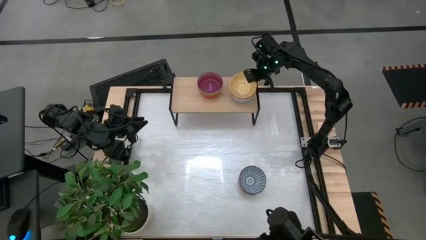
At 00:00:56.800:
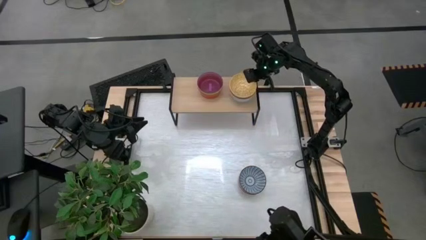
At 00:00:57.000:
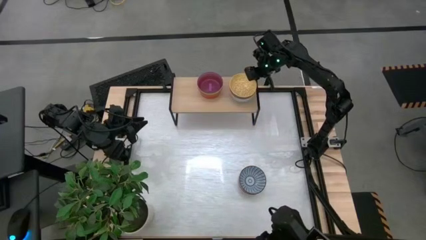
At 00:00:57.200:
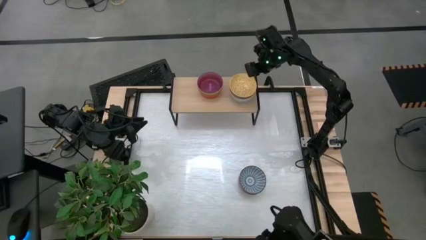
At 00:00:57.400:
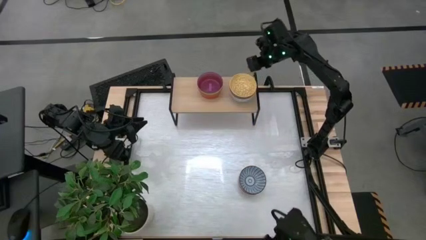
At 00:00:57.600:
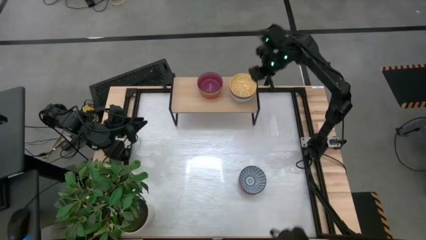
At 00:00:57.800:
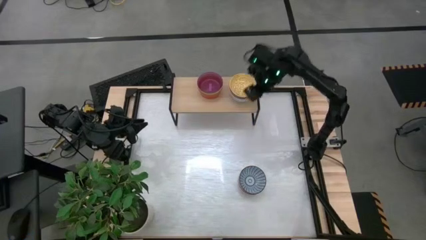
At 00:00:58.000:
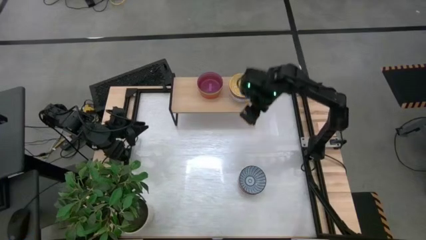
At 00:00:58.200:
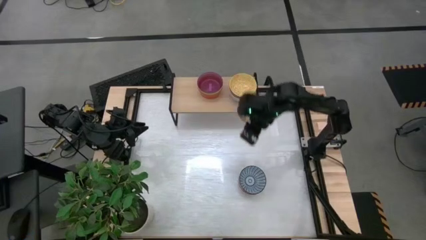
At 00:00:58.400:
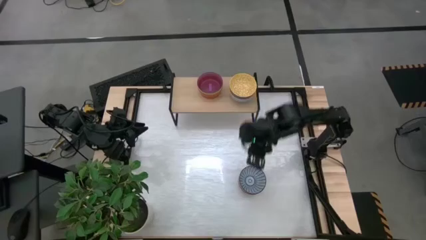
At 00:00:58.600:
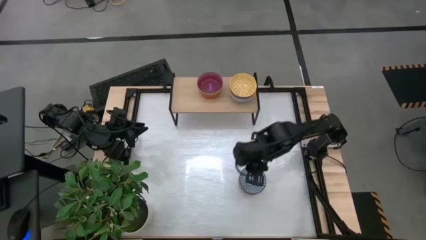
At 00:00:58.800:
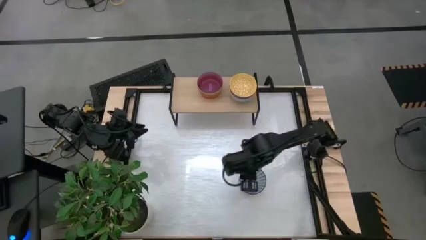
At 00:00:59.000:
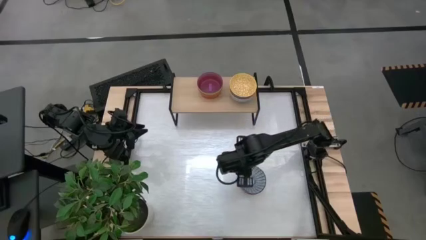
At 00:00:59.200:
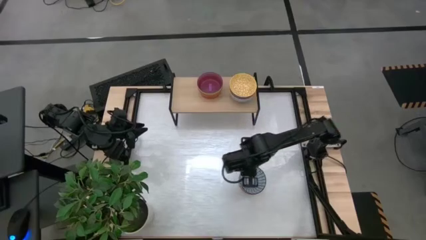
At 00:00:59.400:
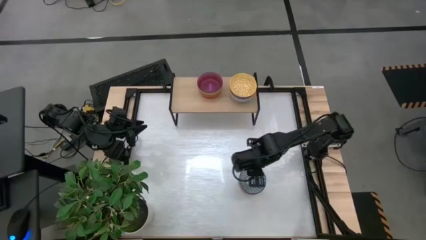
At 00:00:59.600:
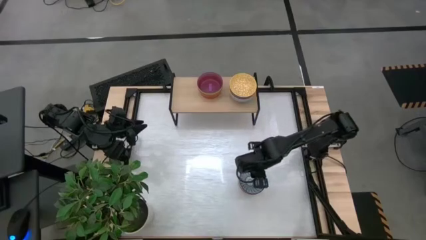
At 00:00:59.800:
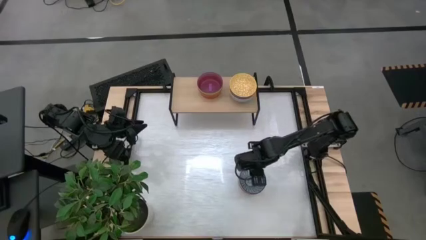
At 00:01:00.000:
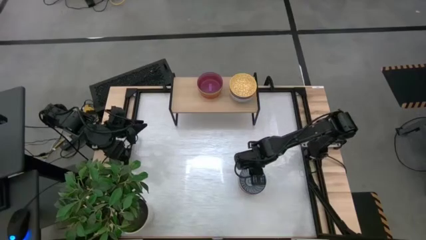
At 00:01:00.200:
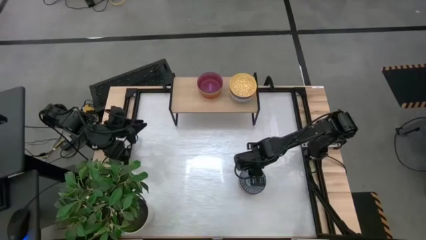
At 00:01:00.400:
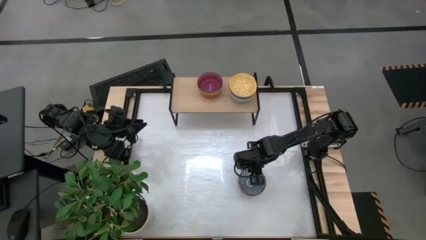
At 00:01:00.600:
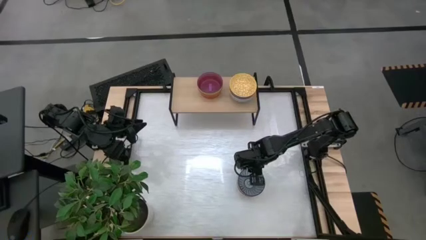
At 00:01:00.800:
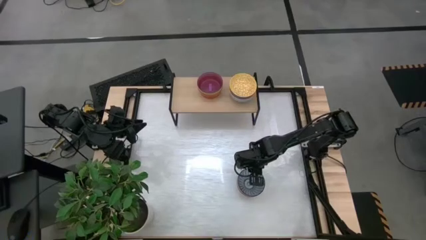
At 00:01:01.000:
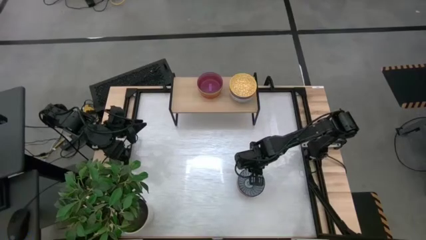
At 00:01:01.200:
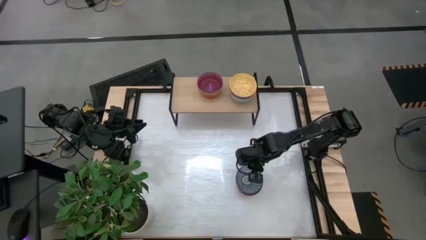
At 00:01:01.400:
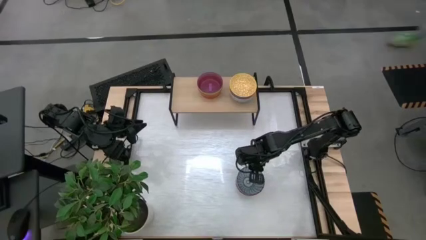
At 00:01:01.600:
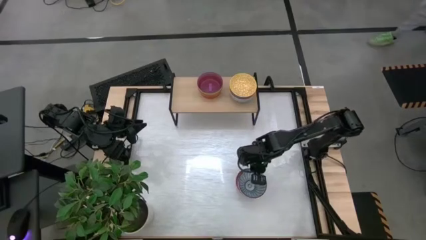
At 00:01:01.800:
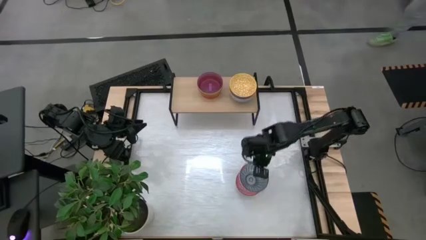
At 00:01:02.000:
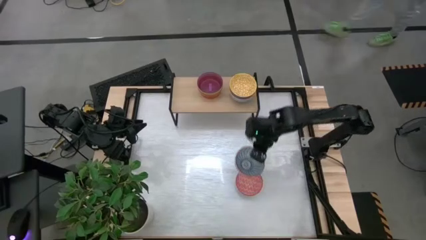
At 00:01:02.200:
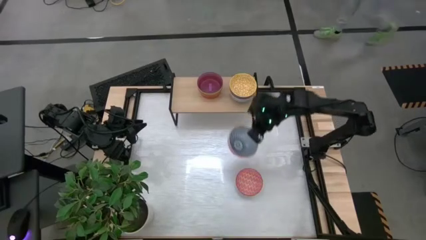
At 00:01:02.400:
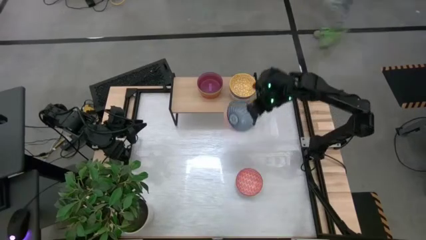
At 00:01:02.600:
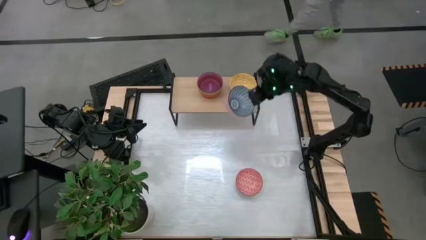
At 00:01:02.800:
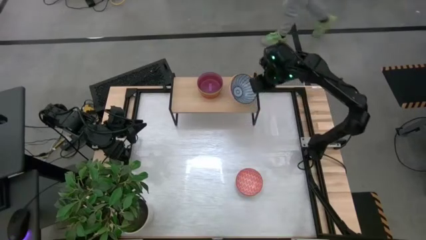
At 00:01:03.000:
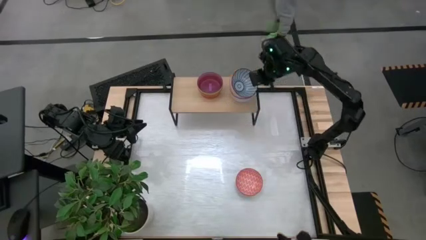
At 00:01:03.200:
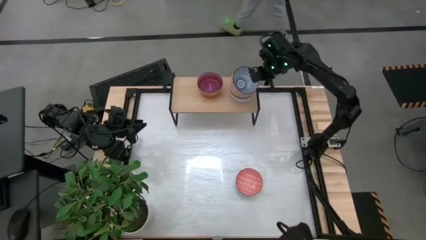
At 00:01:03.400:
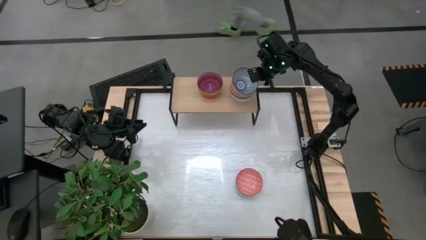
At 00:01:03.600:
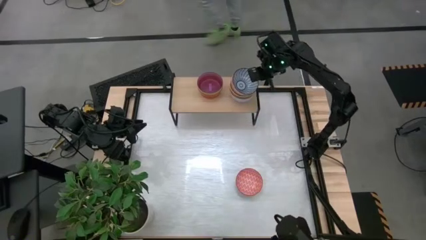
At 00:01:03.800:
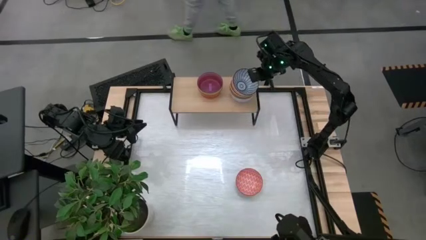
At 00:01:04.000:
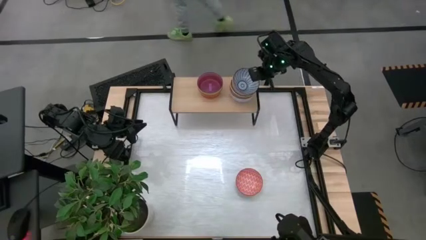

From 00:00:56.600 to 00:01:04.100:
Task: Place and stack bowls onto a shelf
Stack the blue patterned bowl on top of the yellow patterned bowl on the shelf

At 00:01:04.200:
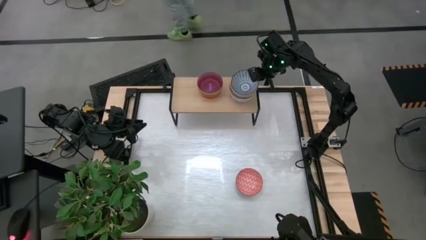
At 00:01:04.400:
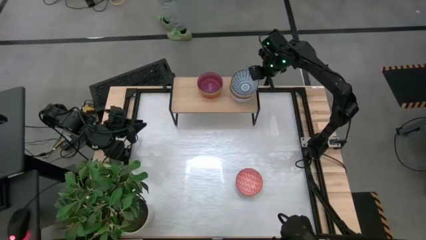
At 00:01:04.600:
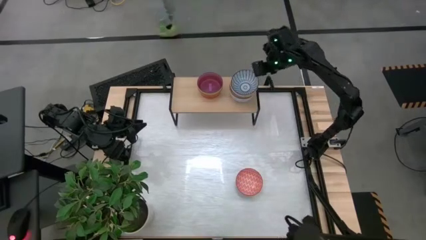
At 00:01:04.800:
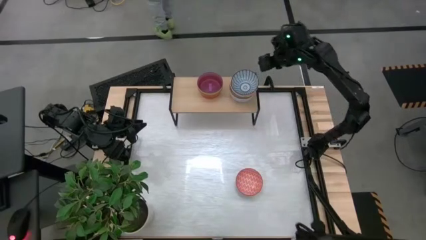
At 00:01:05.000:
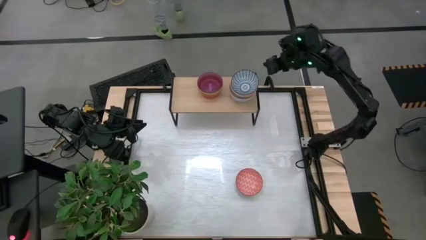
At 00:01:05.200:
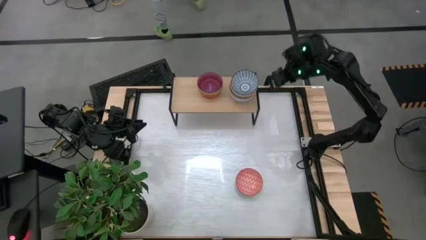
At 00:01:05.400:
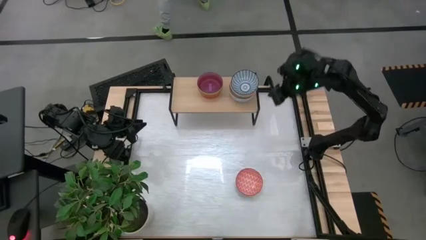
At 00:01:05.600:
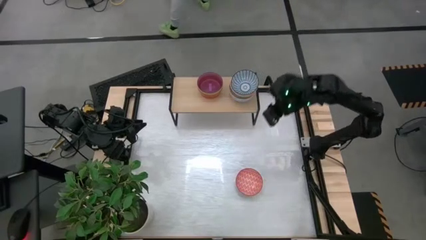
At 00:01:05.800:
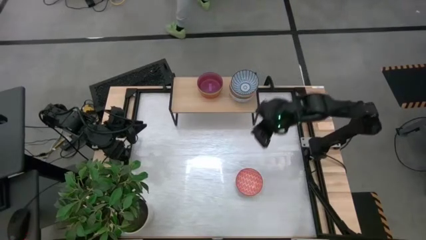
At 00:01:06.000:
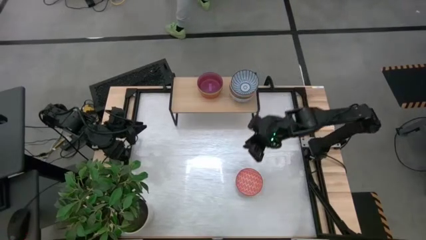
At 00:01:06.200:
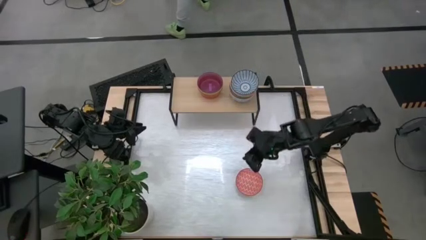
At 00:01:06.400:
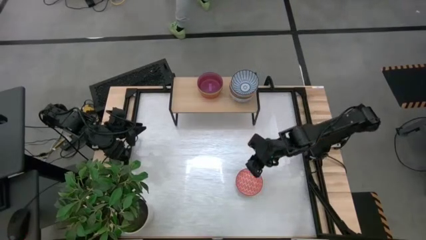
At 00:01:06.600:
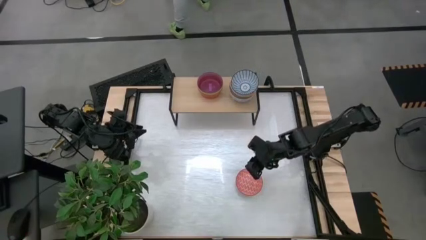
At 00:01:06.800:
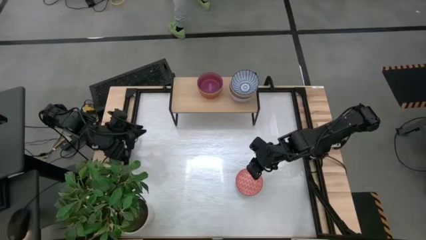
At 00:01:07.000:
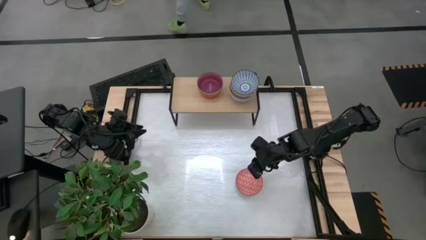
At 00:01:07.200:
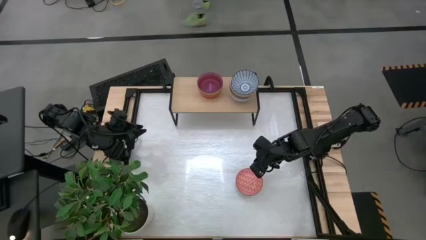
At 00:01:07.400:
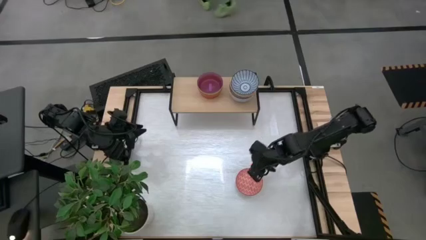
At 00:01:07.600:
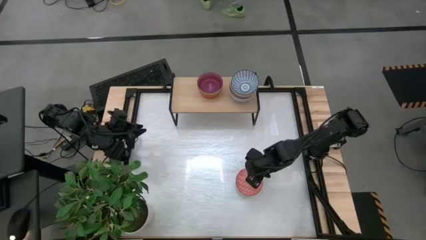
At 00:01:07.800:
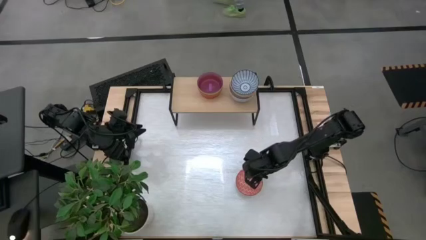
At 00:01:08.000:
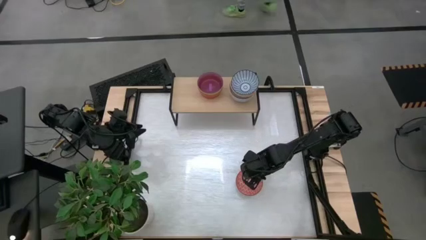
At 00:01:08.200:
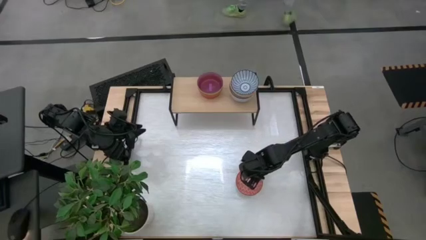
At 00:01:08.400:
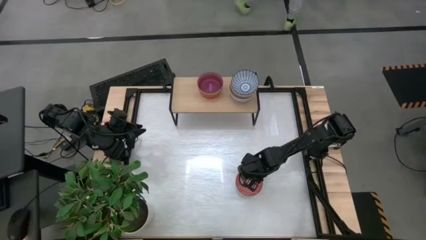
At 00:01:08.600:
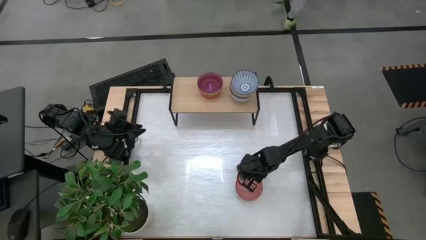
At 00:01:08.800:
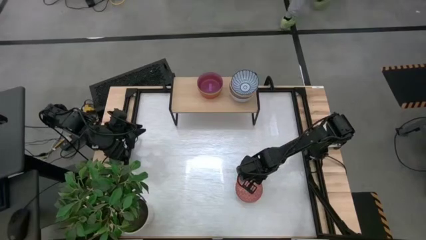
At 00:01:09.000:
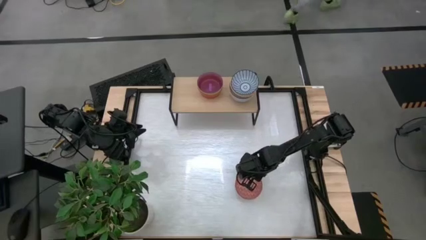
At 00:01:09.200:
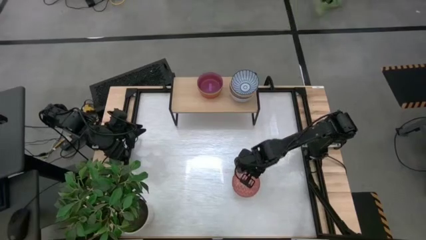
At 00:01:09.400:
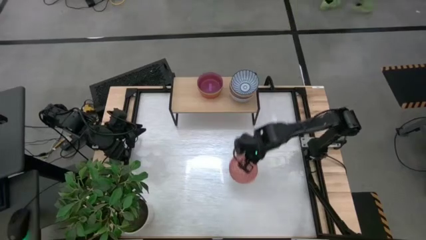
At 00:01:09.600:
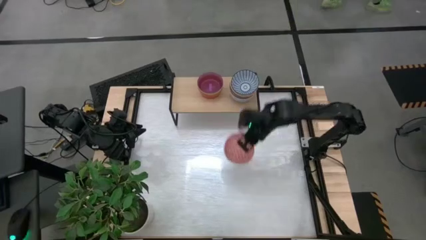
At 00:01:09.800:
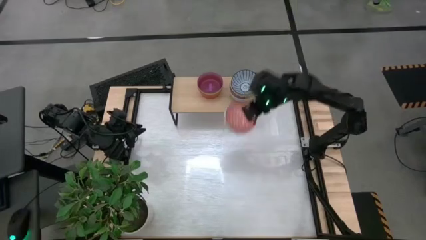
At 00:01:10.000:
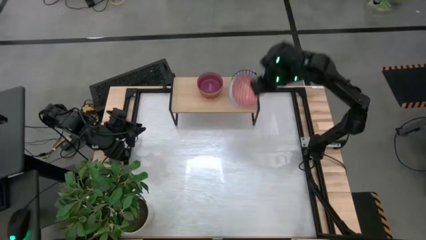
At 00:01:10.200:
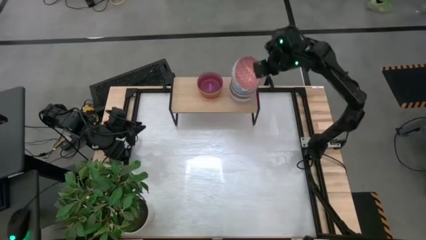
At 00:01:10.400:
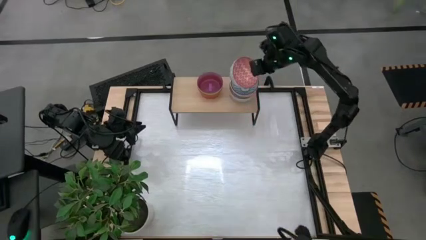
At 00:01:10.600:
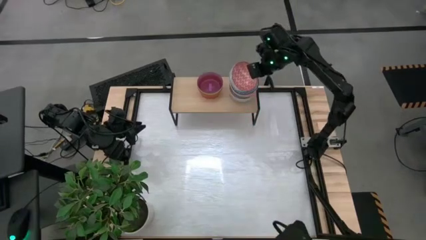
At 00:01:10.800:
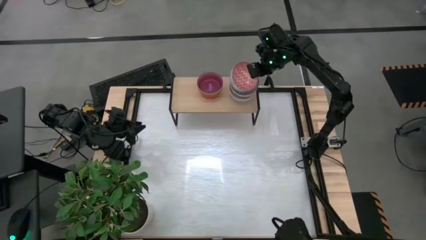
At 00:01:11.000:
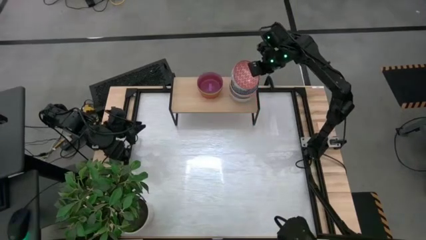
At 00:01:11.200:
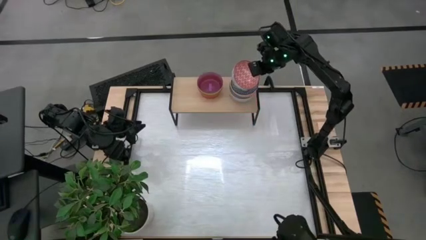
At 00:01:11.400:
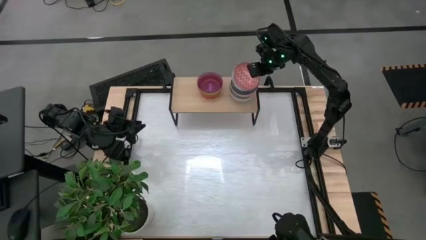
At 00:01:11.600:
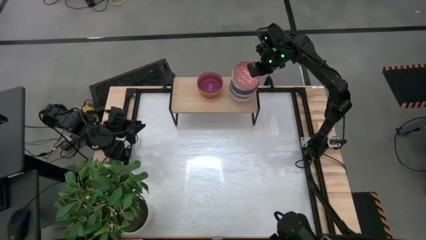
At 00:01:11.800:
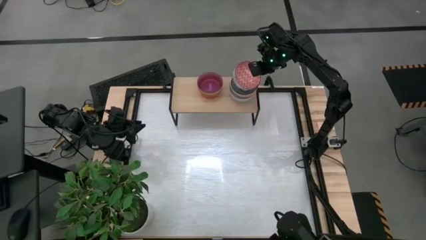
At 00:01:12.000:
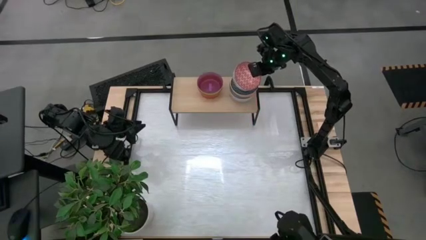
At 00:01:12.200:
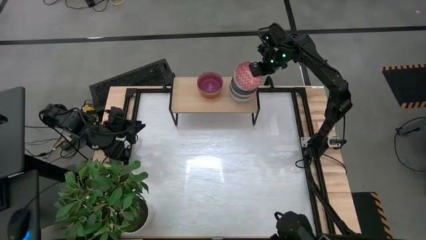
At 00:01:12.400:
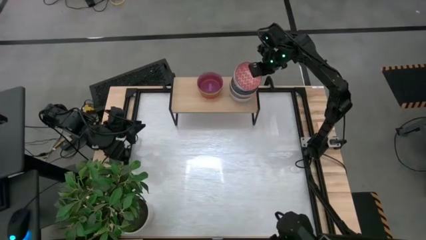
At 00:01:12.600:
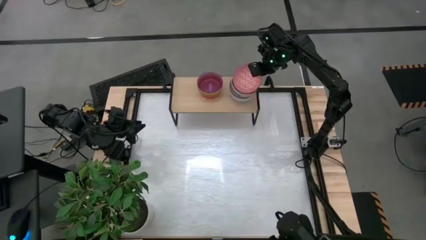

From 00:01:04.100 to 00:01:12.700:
Stack the red patterned bowl on top of the blue patterned bowl on the shelf
